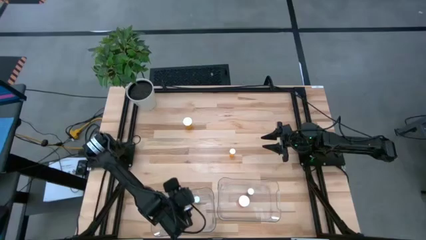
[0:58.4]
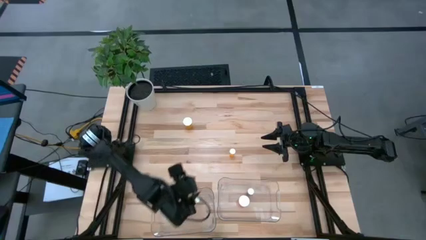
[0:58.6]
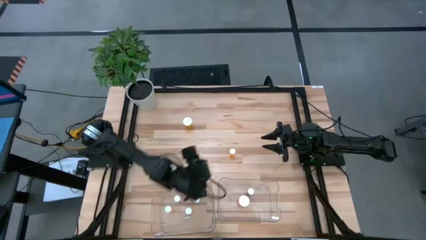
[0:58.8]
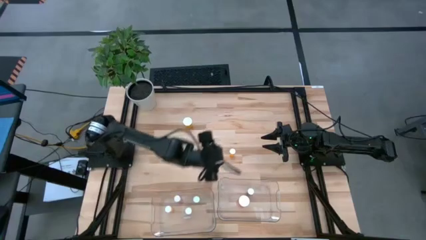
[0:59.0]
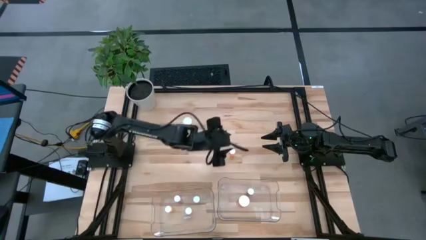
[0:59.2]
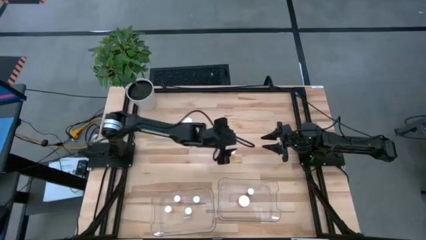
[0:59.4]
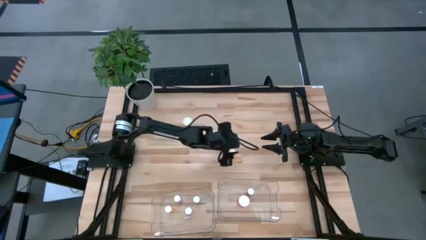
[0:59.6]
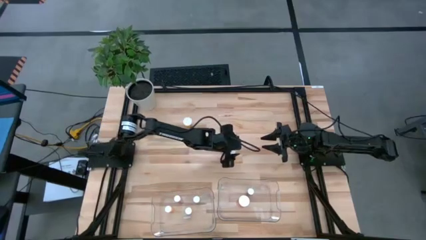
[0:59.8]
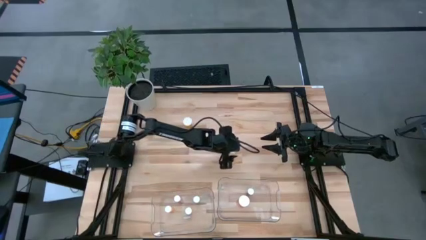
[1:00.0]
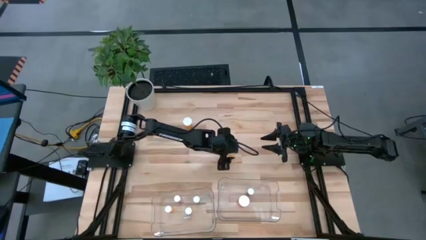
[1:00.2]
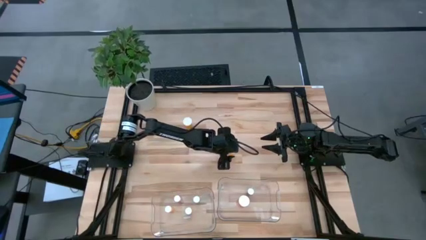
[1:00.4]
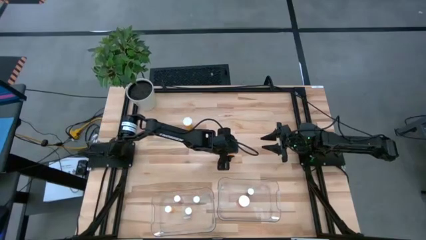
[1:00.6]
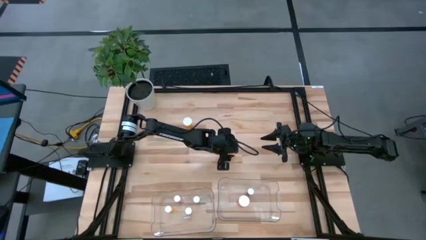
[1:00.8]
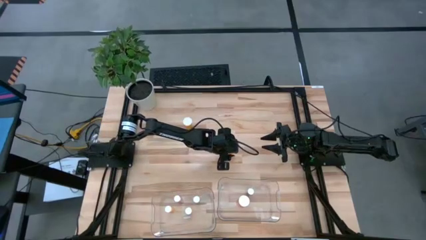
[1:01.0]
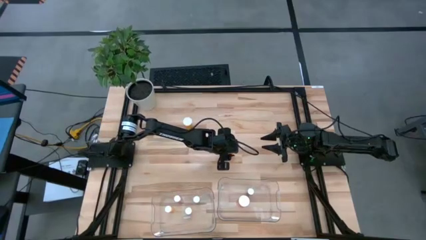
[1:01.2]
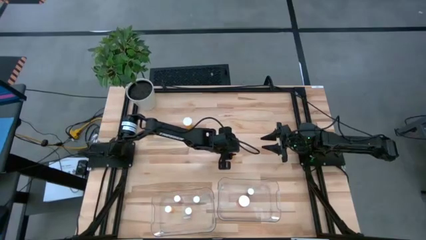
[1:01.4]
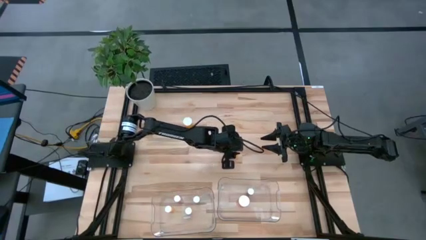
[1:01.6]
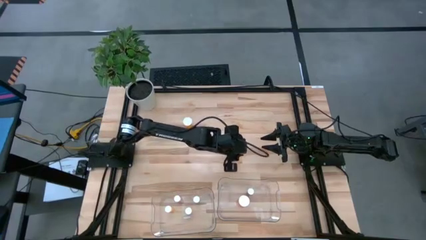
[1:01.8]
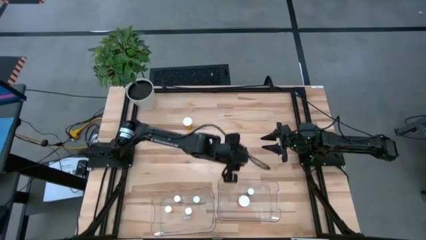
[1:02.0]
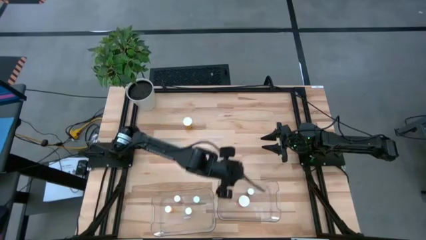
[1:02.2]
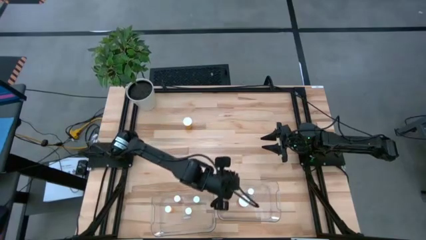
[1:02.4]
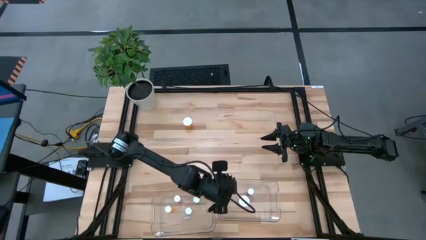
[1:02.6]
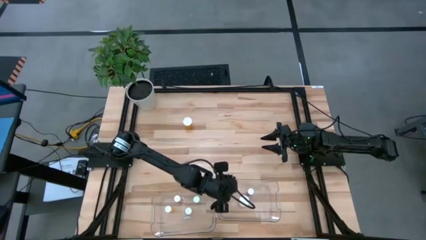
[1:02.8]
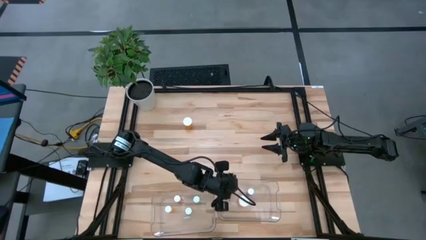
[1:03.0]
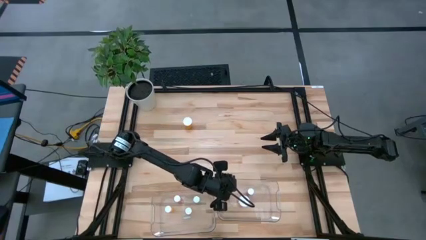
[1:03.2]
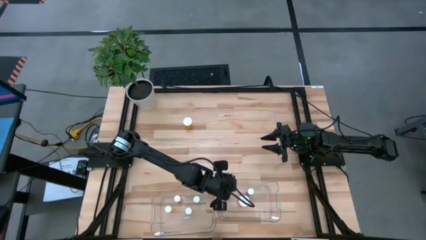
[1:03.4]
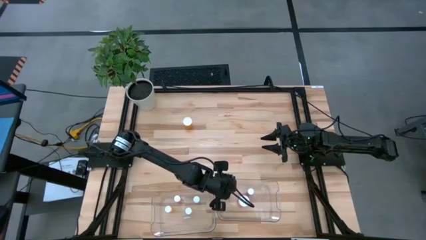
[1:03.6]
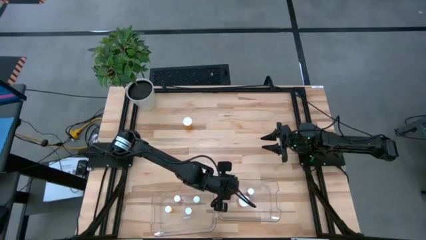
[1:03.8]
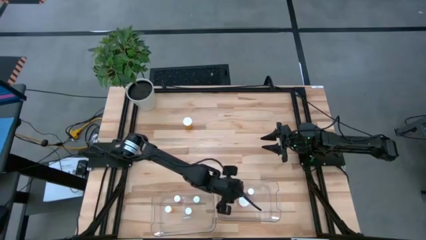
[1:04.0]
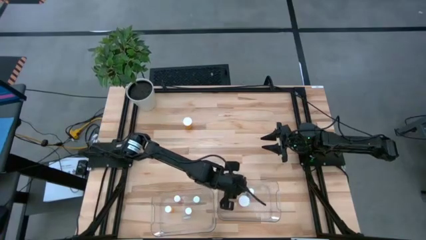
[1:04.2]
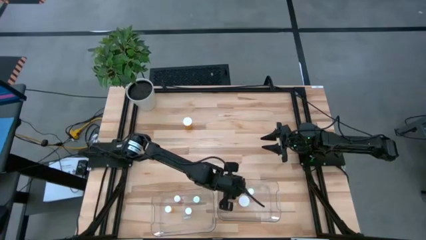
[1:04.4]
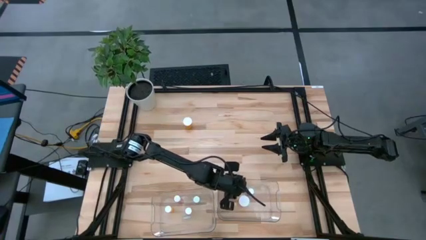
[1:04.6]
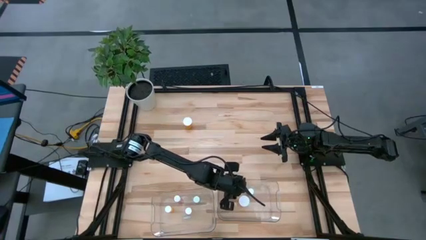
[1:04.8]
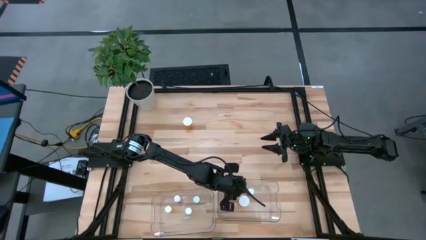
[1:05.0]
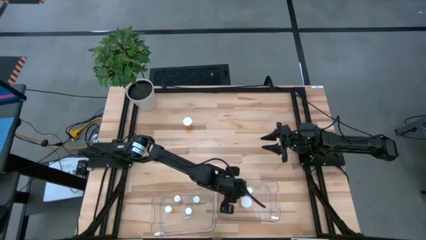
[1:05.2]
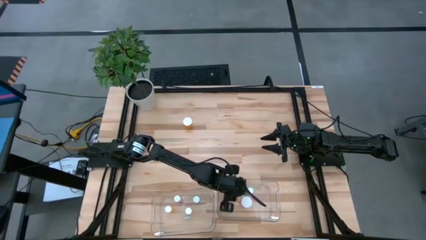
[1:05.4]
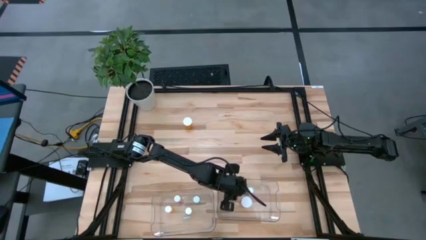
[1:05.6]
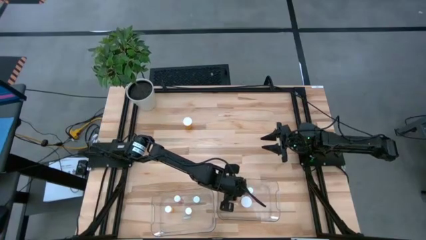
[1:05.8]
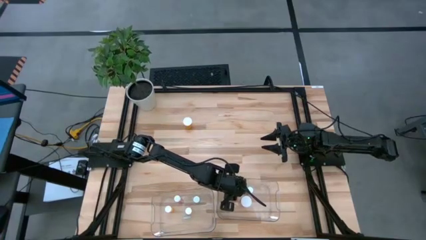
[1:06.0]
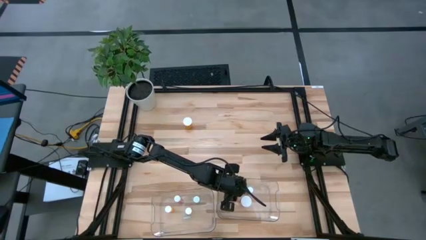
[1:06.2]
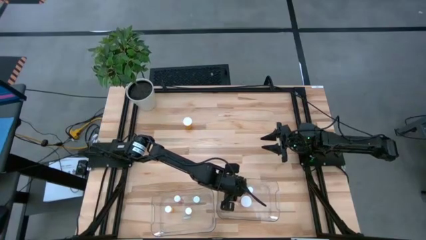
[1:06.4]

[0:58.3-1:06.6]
Task: Pick and place medicine bottles into bin by pill shape (circle, oval)
Put the orange capsule bottle into the right transparent bin

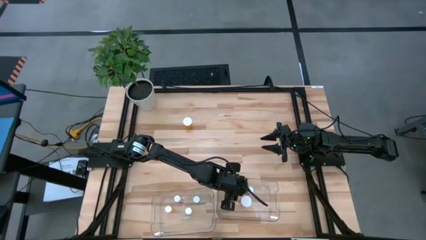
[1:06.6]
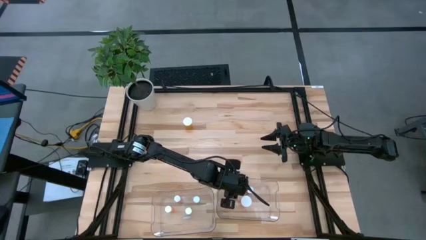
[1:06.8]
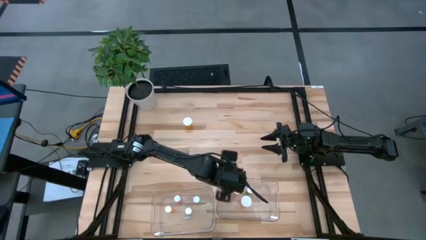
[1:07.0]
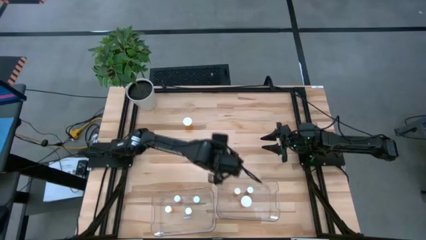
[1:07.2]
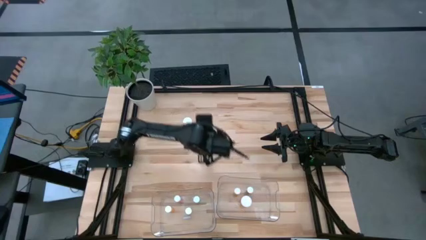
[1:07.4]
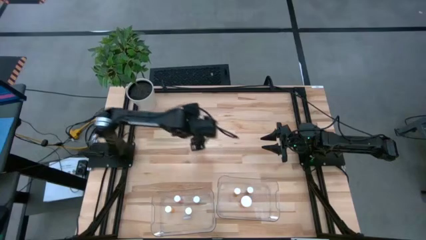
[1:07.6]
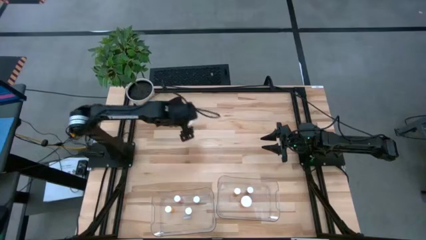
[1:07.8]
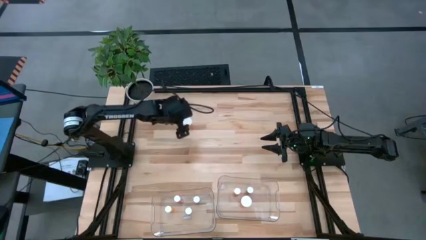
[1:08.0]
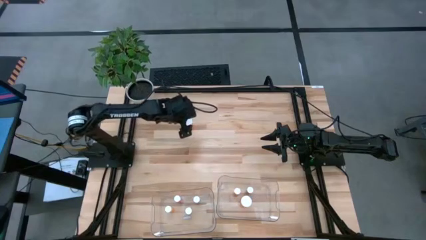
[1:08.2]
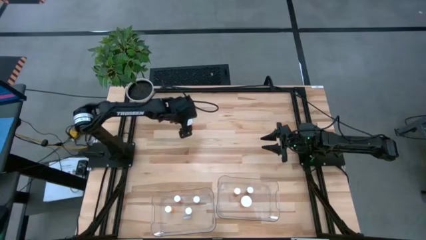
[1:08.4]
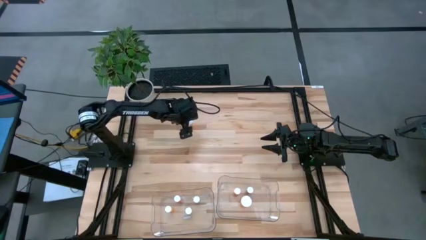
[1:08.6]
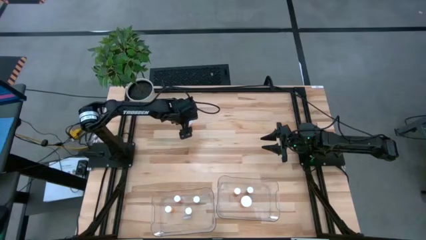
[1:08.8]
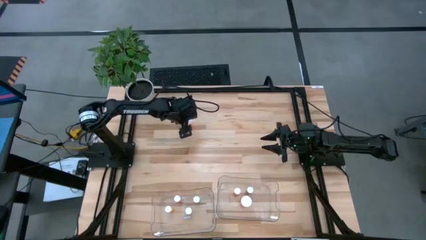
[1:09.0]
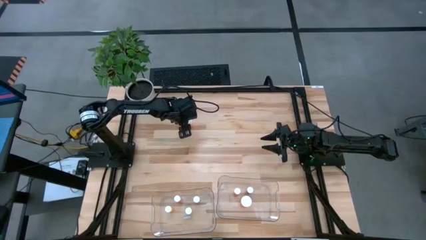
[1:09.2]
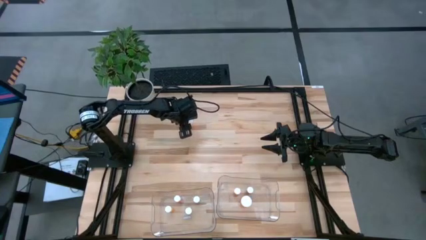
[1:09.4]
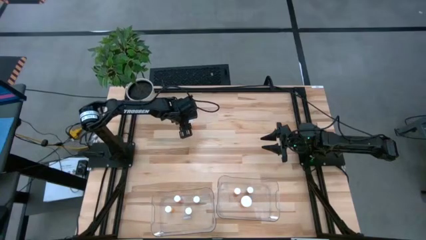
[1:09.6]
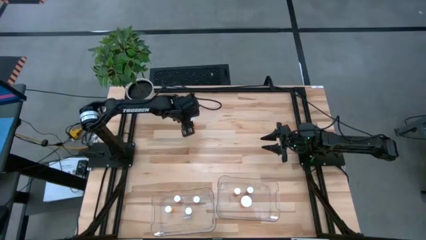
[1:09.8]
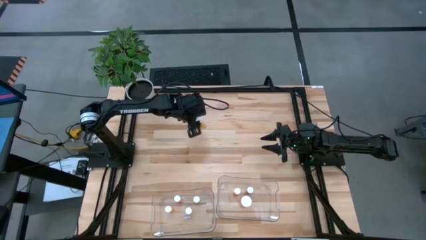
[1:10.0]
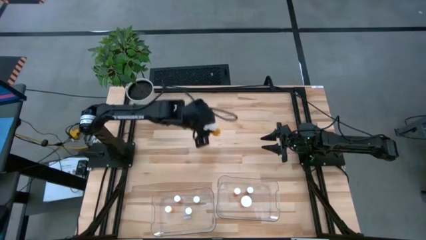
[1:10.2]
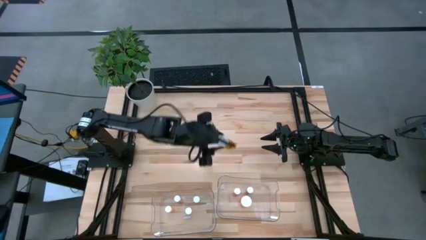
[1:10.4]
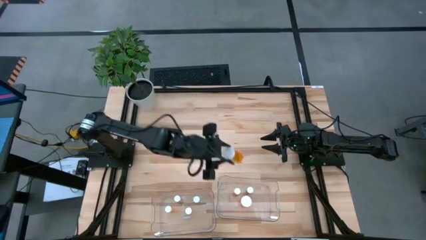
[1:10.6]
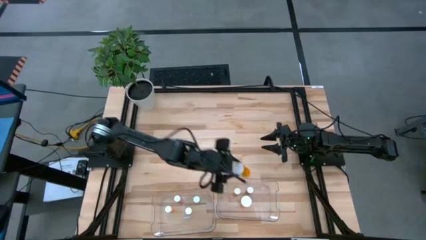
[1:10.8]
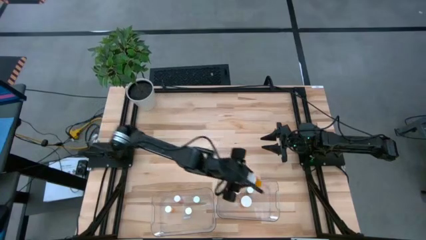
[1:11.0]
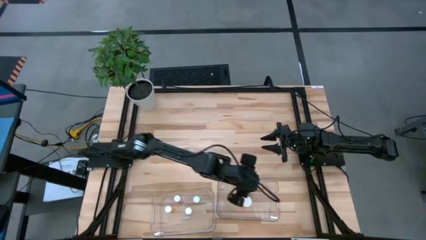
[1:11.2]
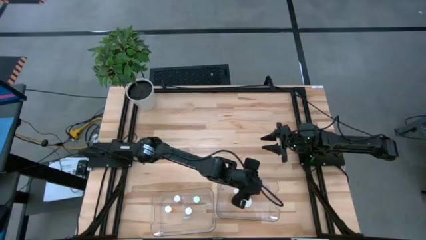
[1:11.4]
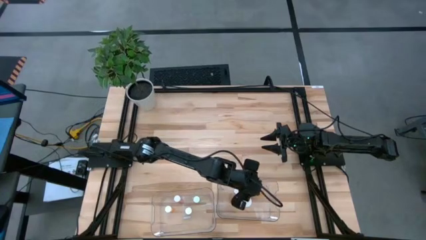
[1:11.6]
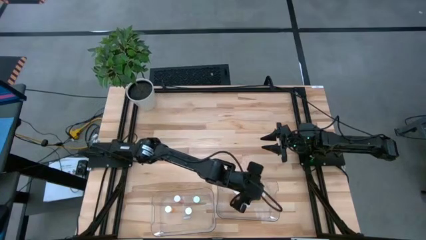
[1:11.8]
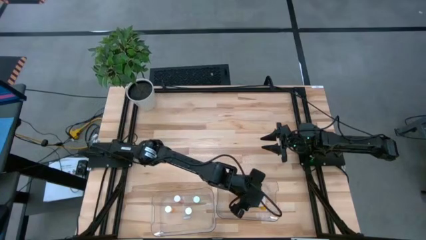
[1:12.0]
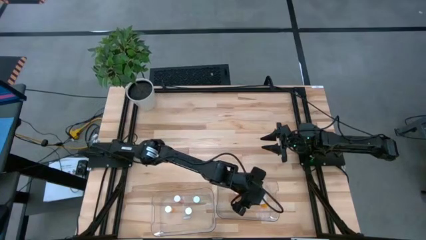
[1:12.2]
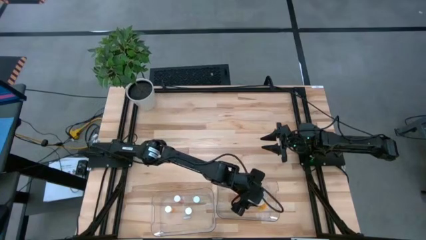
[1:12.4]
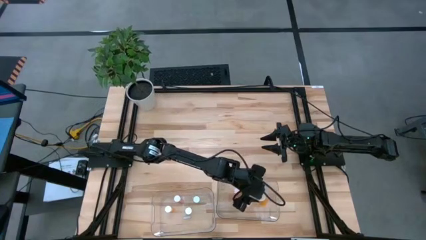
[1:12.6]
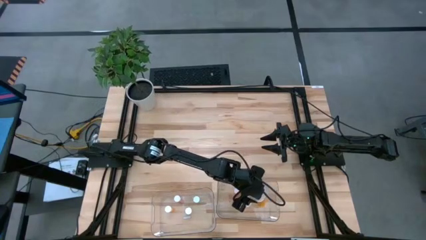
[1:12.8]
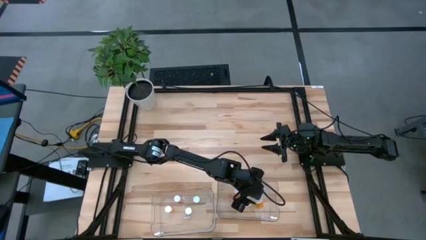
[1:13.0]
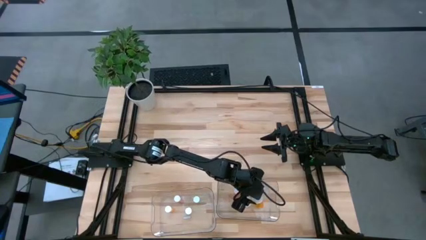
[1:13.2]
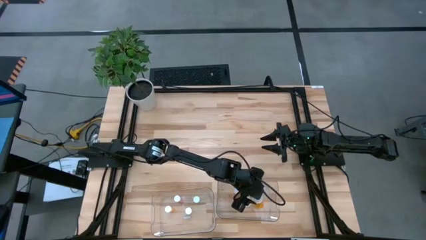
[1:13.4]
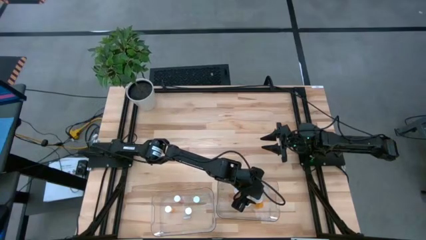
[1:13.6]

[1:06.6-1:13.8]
Put the orange capsule bottle into the right transparent bin

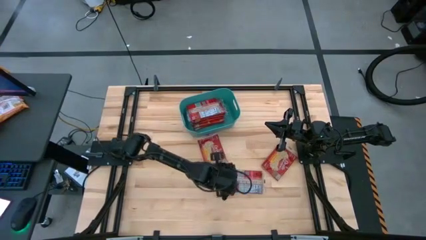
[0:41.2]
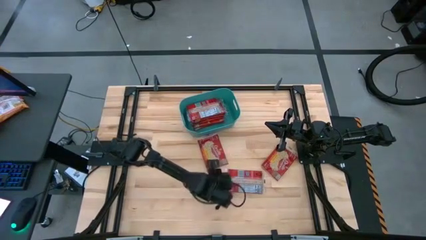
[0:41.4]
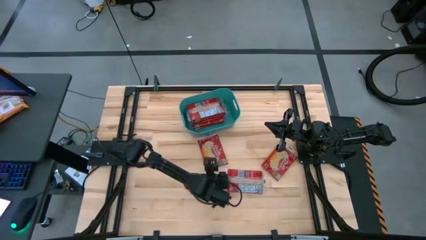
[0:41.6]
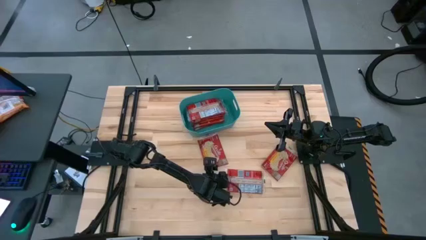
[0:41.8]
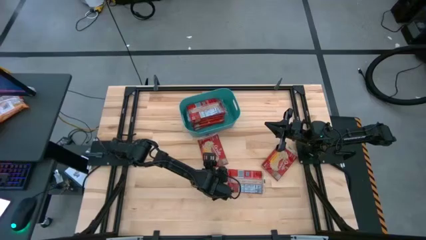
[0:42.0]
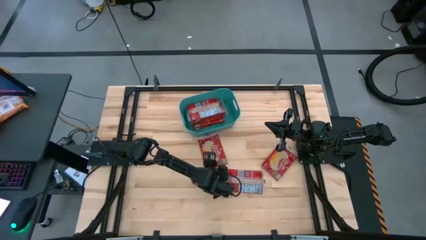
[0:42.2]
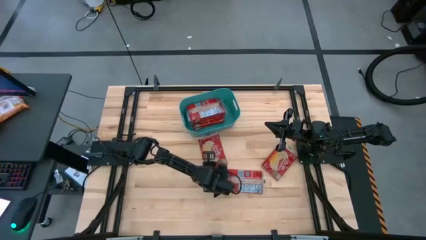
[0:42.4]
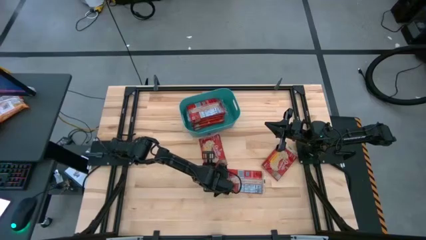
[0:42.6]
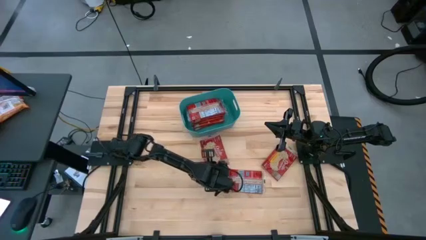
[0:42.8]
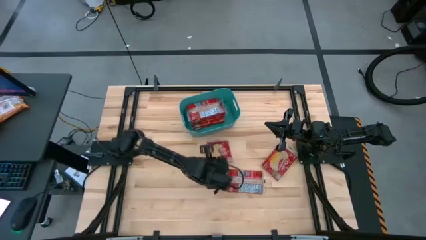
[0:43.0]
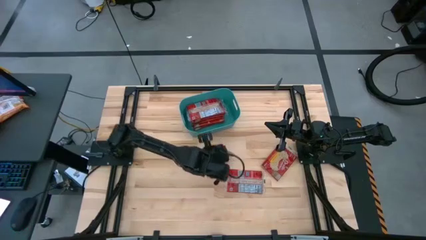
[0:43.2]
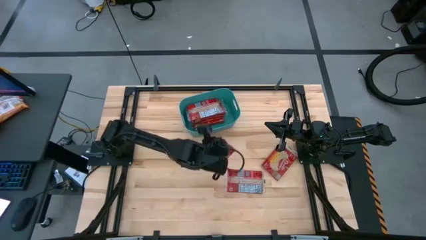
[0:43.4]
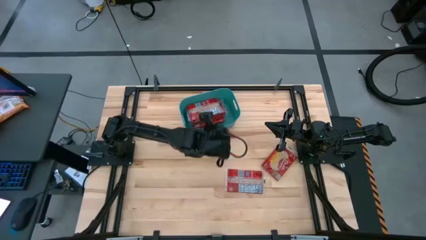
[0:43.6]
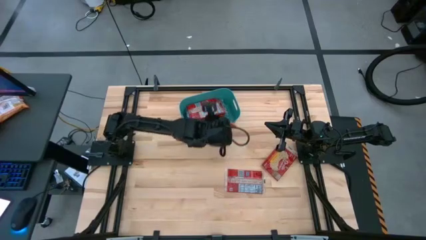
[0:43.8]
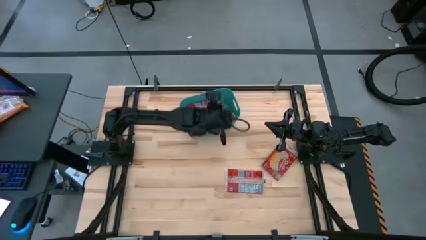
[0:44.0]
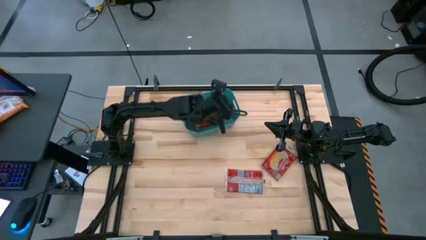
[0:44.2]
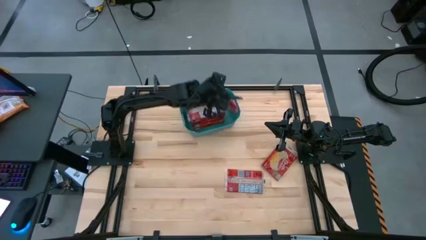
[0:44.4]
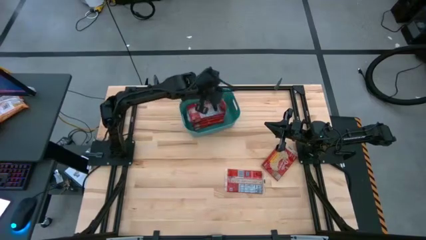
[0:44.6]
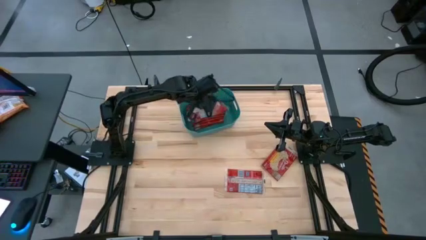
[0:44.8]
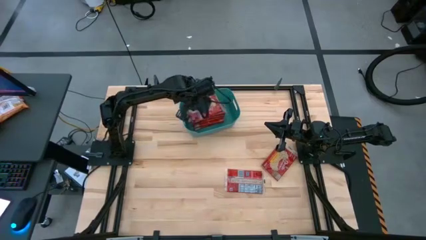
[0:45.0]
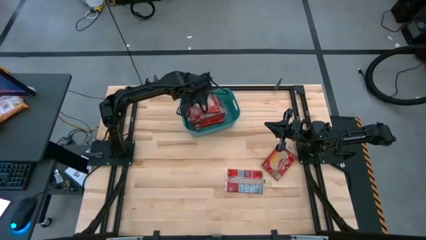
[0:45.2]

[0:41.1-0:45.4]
Task: Sort popcorn bags into baskets
Put the top left red popcorn bag into the green bin
